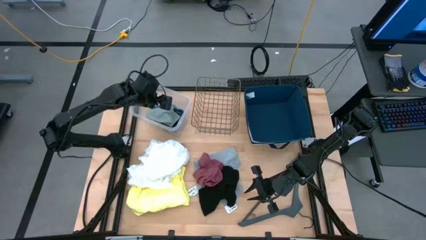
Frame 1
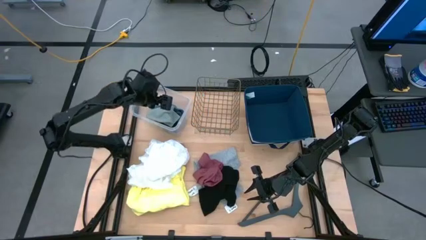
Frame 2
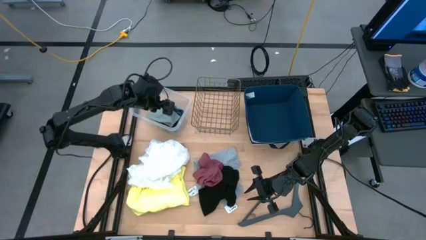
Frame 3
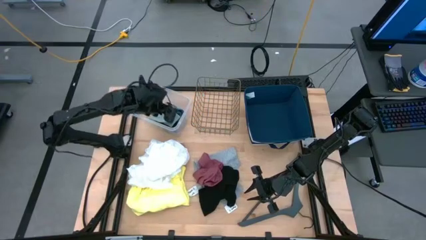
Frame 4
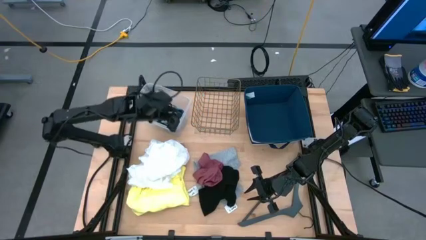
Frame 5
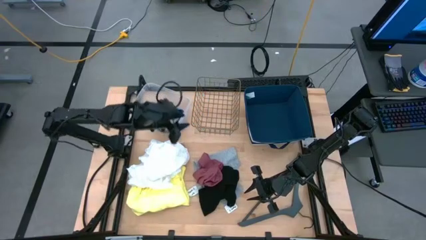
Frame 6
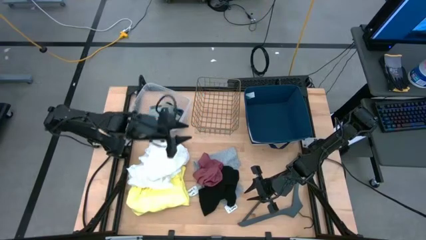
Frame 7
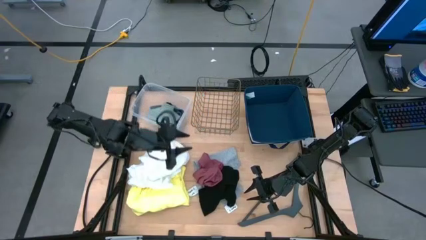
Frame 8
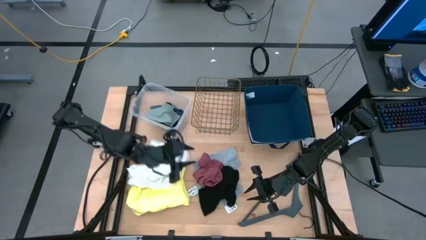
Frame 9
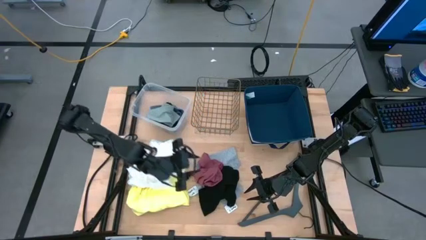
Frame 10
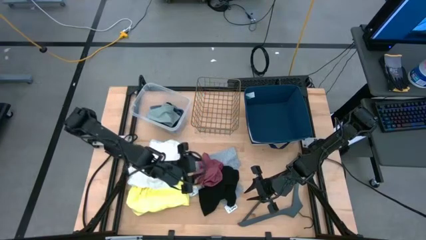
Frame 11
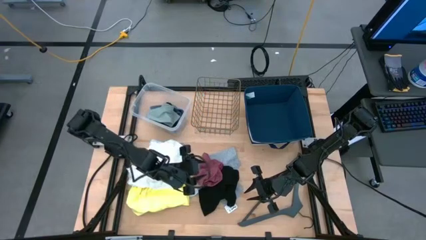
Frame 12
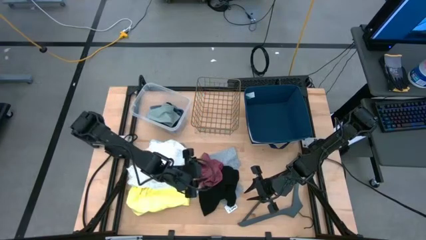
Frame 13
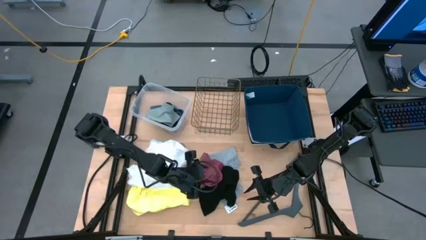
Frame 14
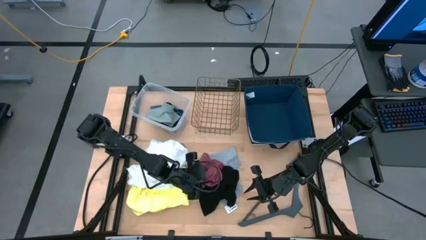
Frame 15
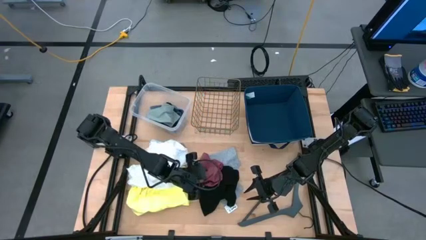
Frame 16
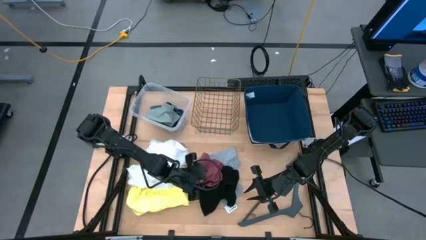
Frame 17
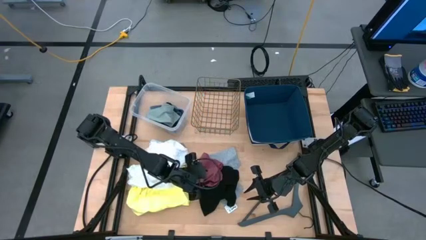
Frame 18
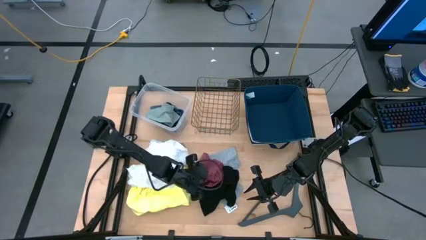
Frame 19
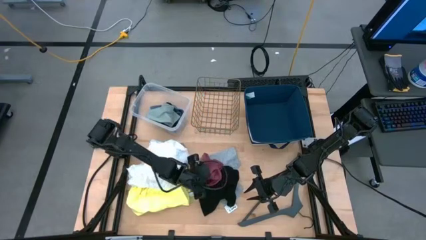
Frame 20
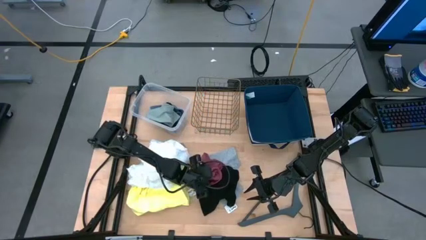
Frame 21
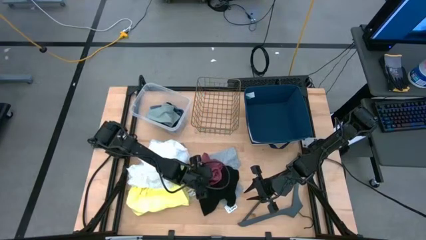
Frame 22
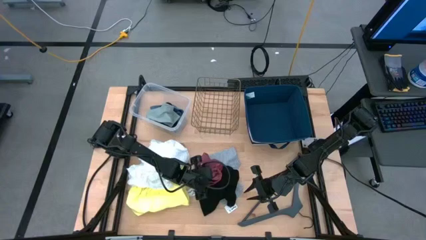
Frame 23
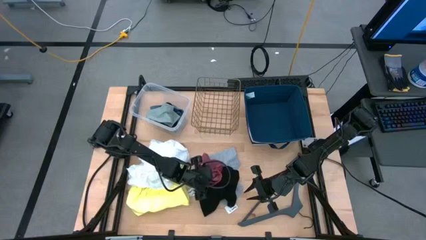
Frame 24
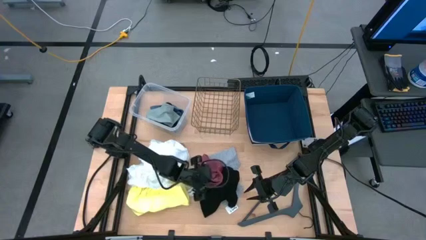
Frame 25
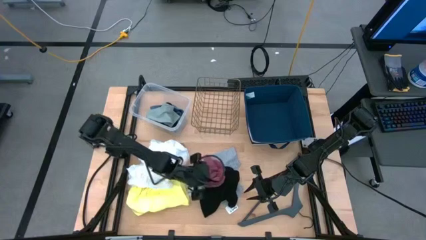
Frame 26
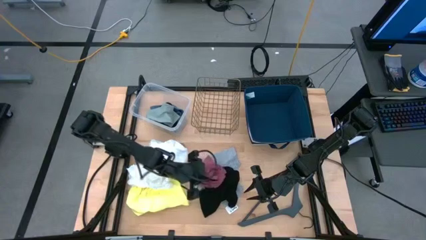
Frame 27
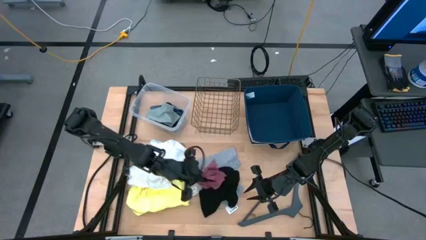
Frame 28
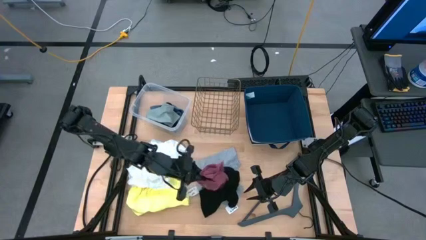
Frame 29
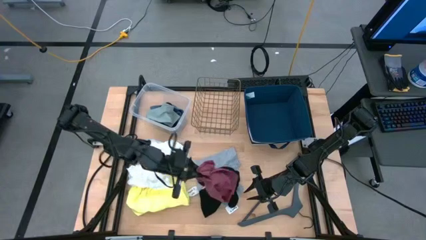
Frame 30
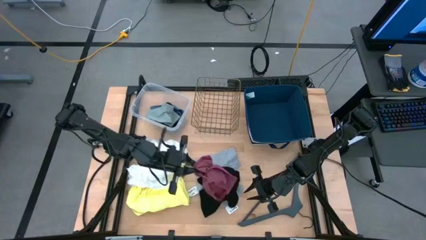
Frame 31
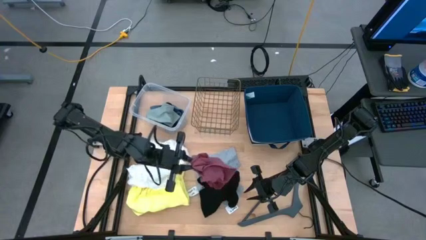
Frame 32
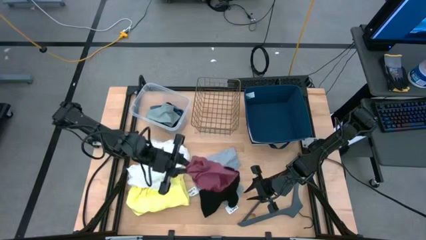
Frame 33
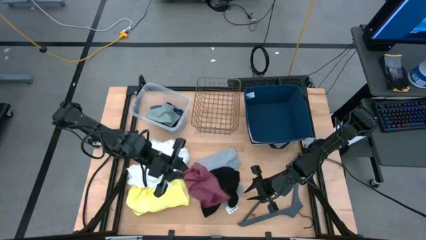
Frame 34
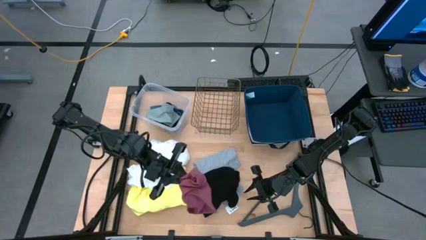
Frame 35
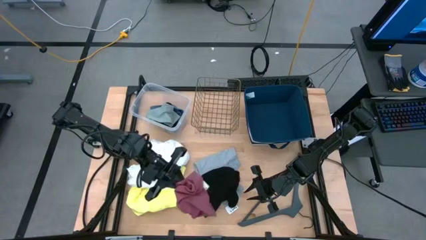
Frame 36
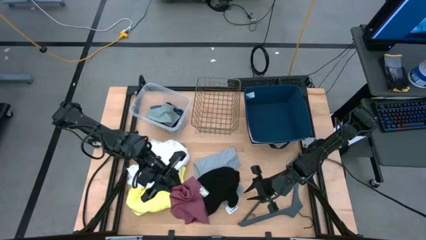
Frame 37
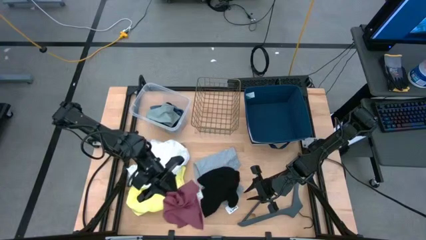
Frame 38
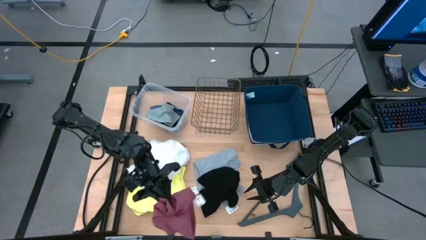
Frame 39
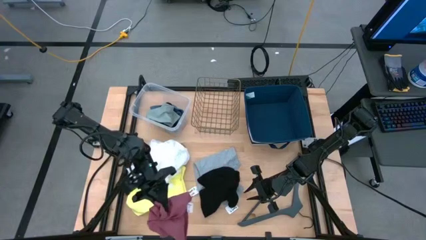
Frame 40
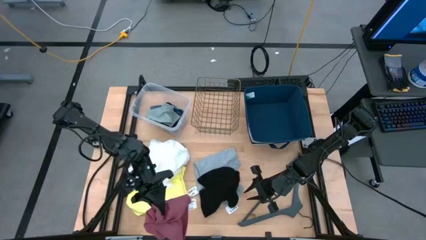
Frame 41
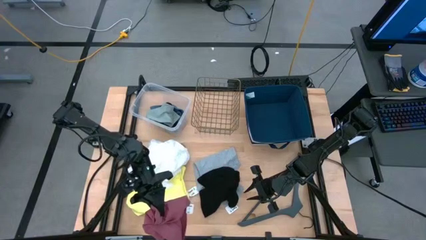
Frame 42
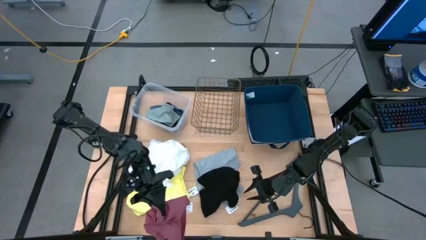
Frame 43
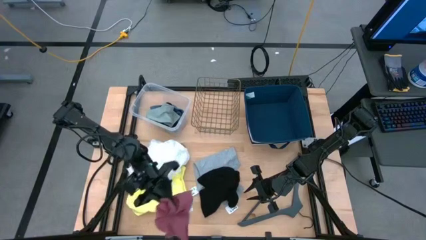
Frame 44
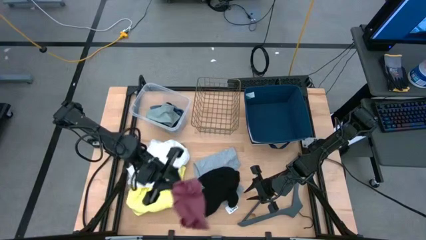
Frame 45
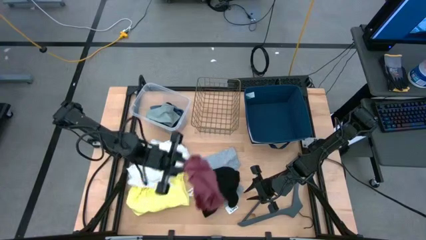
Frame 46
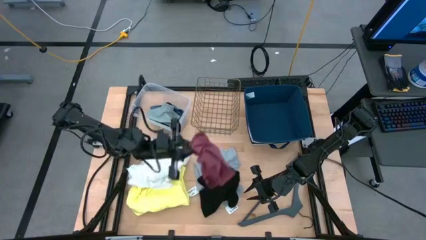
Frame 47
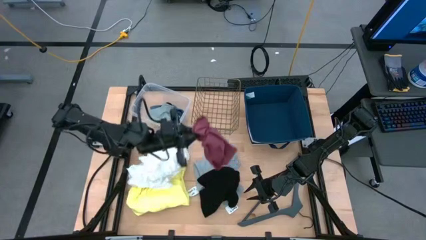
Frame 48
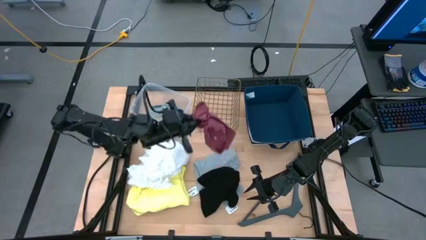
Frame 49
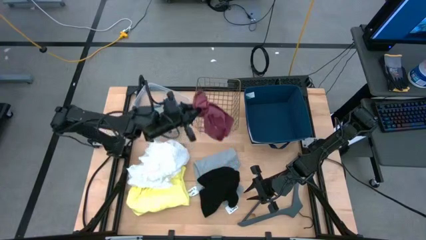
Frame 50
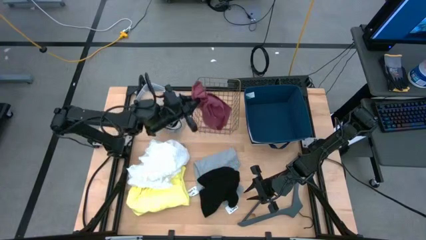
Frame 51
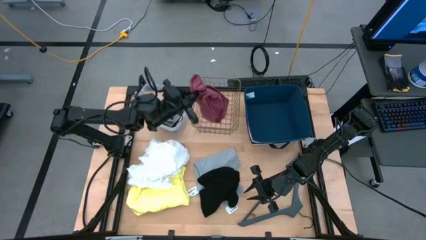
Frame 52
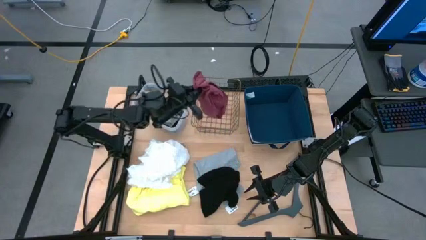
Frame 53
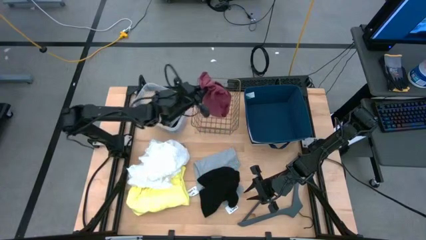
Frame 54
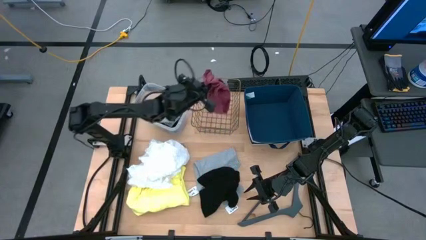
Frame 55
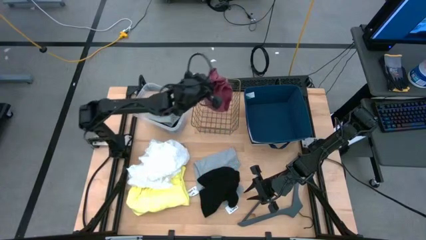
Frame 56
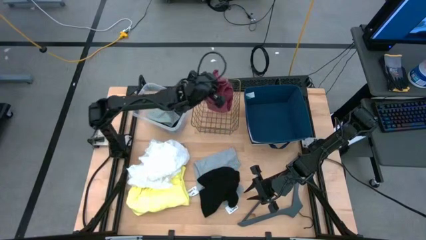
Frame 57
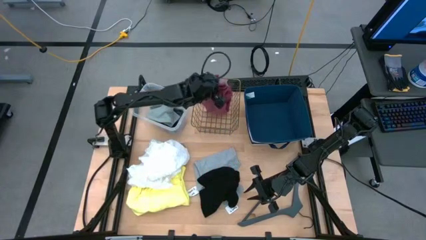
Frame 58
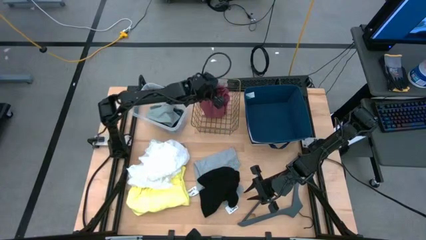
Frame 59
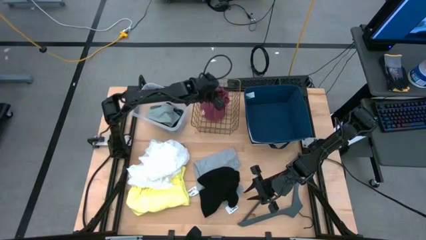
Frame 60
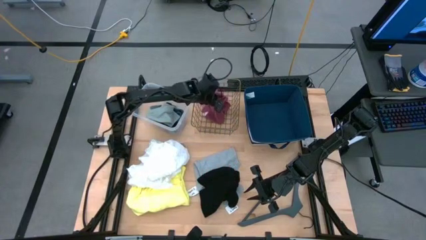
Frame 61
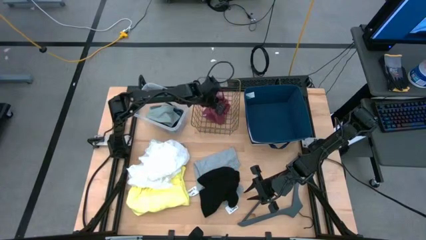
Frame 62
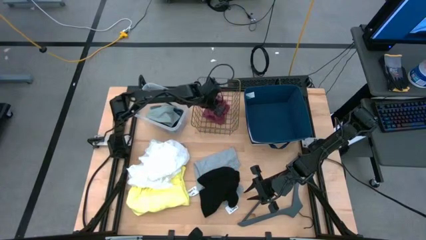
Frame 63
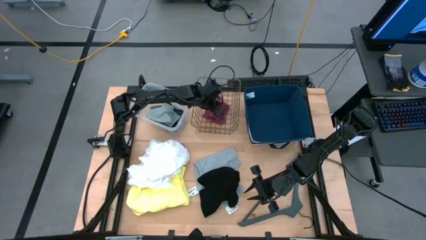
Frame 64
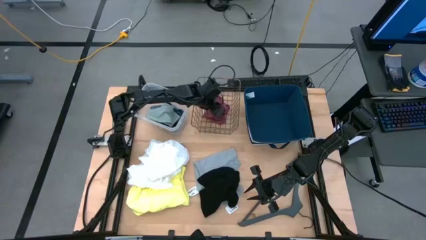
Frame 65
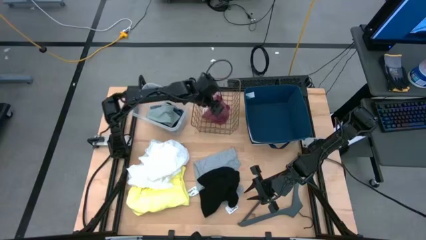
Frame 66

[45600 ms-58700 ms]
Task: Pick & Place Cloths
Put the pink shorts into the mesh basket
